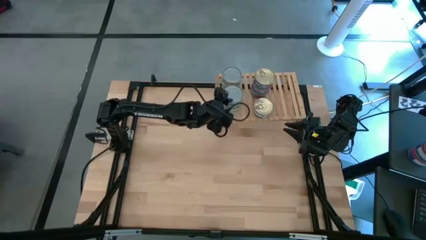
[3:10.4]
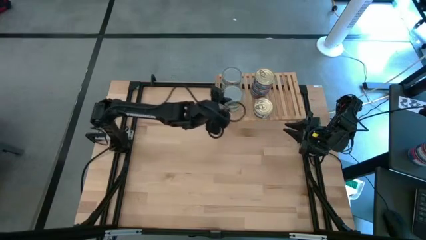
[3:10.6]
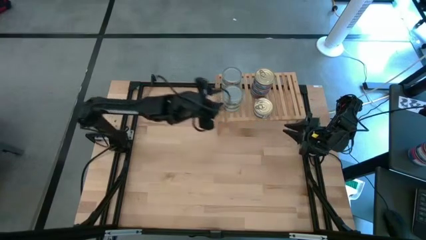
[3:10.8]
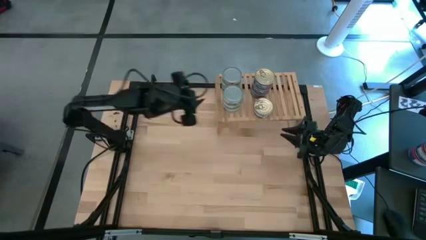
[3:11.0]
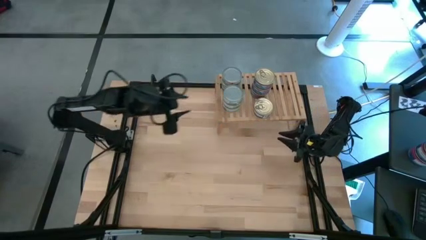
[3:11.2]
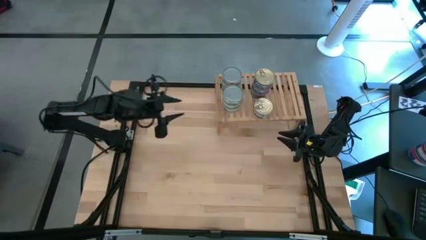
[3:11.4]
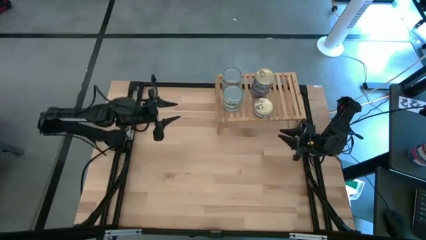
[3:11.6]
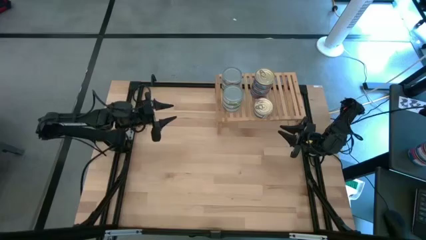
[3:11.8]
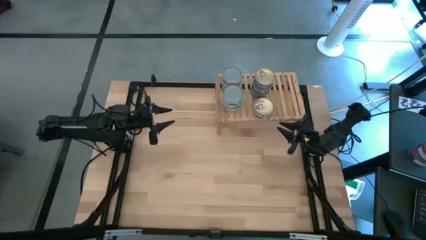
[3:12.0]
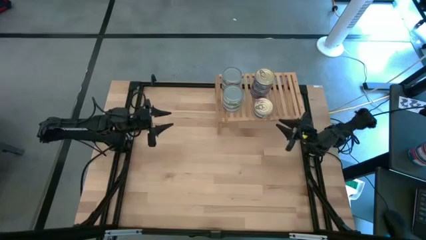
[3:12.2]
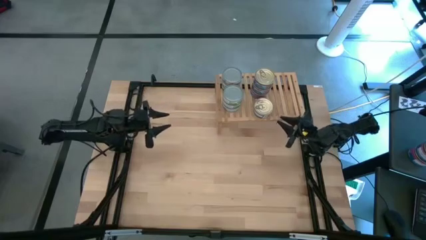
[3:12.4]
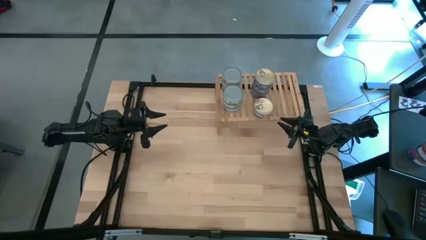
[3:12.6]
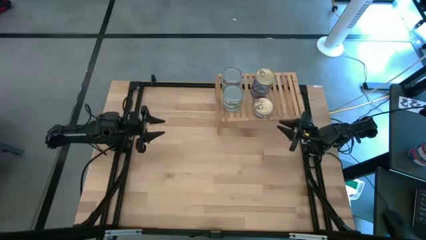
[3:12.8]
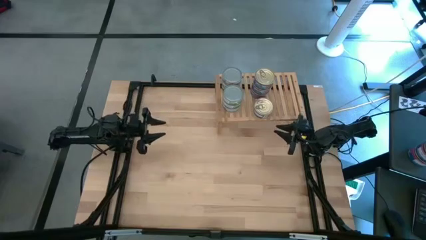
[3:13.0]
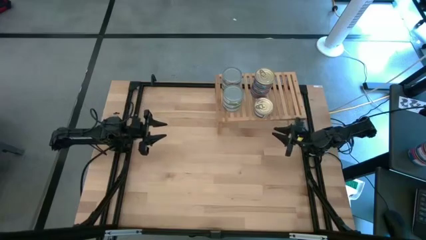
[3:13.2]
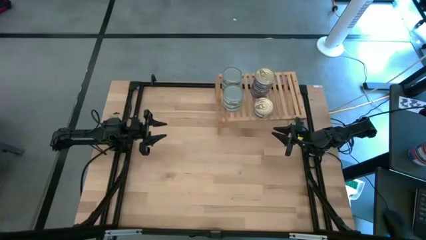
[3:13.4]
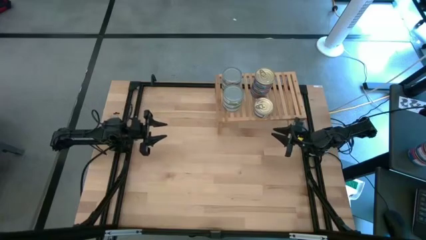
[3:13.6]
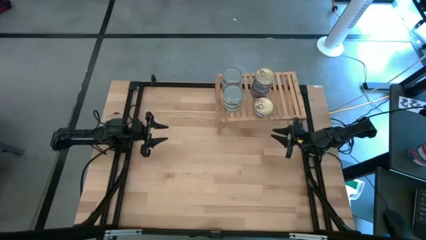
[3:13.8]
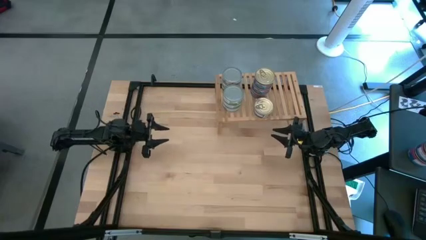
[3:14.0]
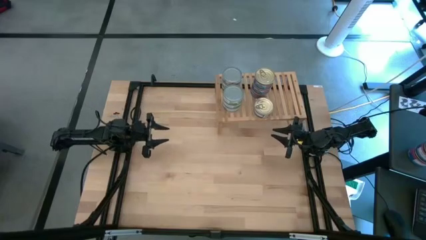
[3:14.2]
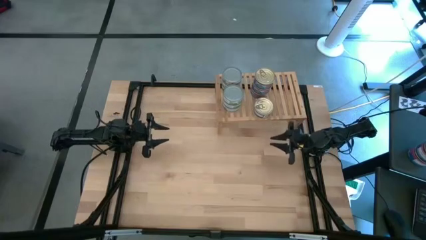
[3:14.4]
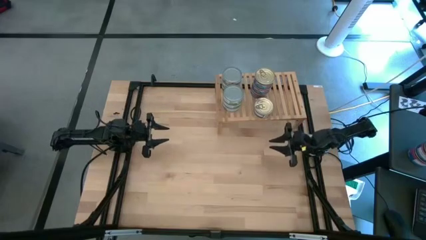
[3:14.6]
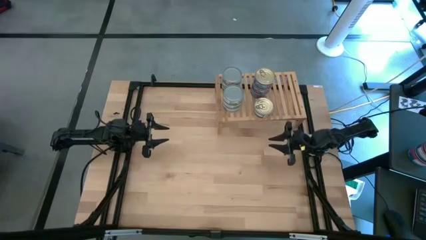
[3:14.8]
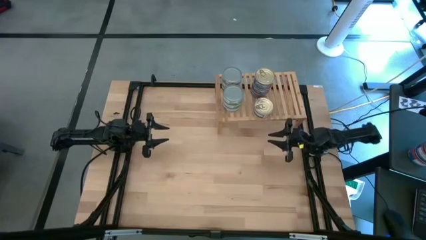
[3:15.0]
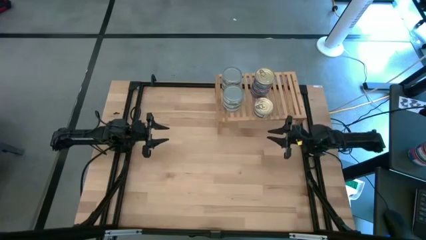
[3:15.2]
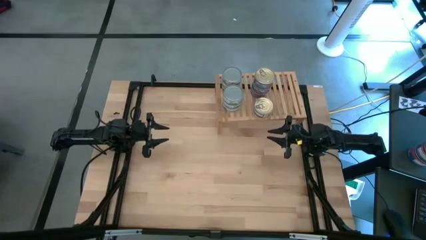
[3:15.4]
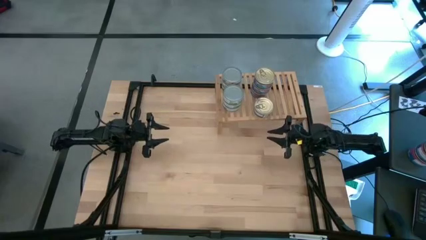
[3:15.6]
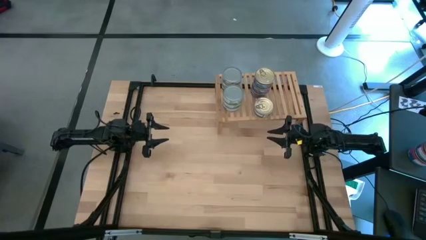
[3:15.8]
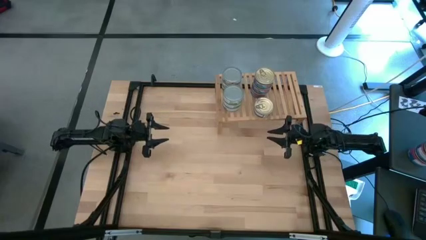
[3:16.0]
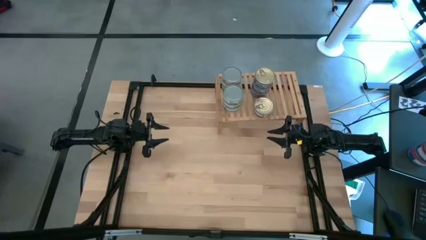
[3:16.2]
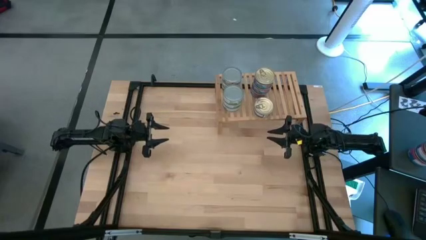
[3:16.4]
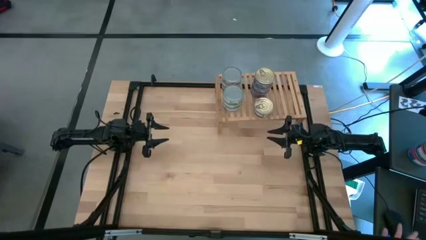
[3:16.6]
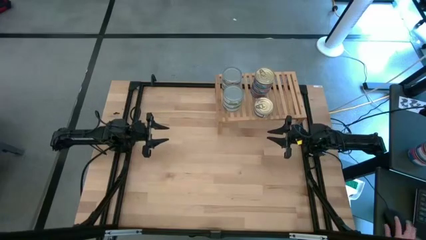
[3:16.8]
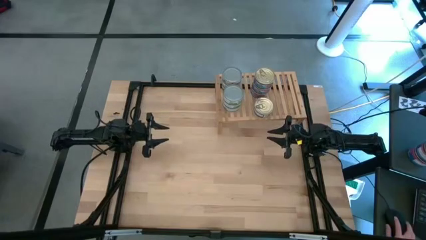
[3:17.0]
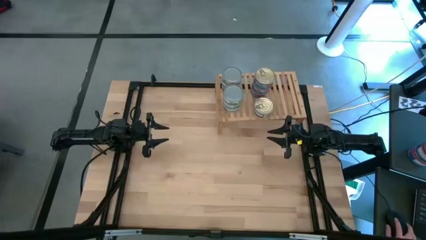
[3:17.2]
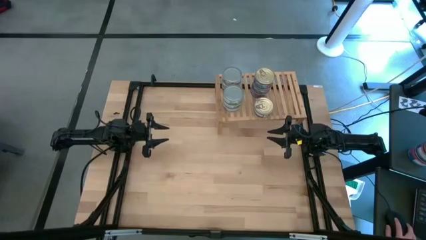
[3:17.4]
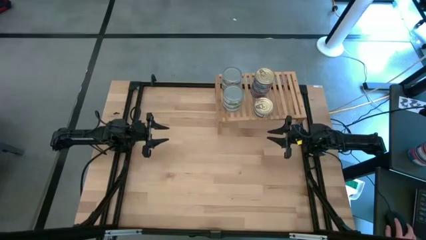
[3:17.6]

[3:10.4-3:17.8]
Task: Stack canned seafood by type on shelf
Return to Home Position

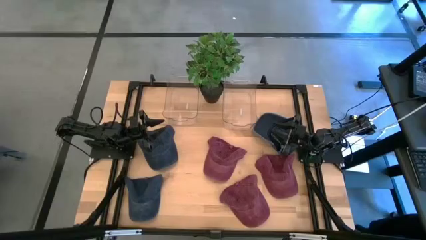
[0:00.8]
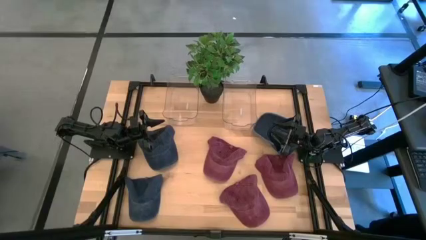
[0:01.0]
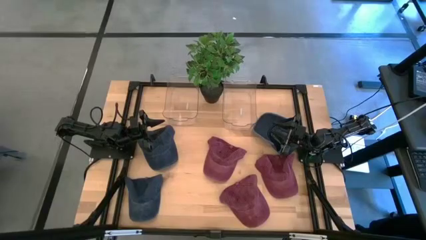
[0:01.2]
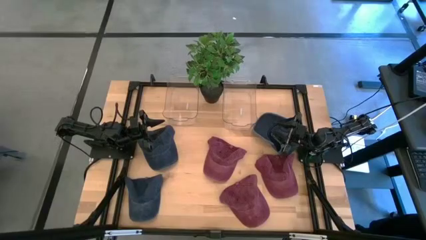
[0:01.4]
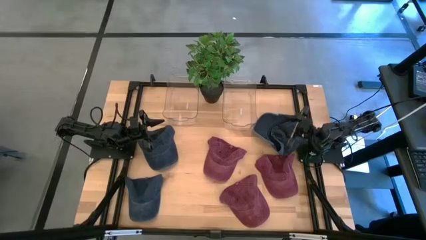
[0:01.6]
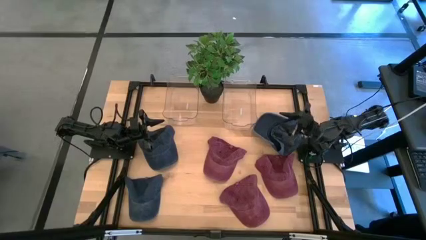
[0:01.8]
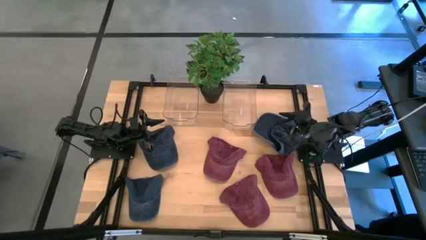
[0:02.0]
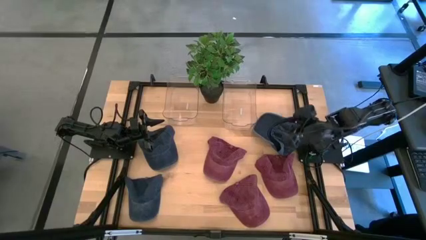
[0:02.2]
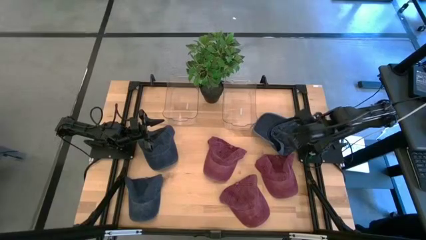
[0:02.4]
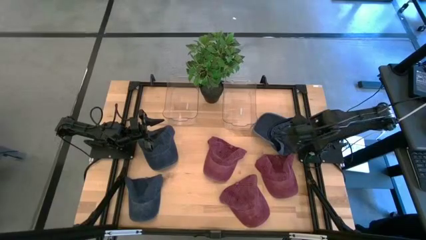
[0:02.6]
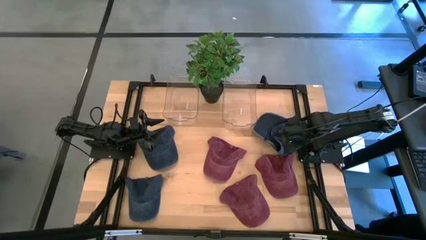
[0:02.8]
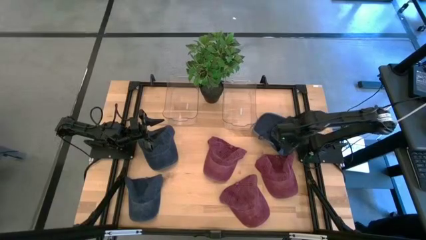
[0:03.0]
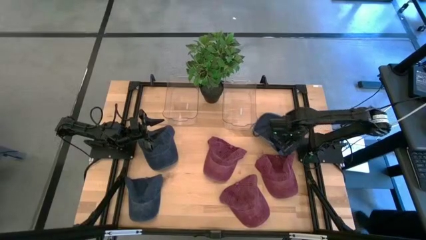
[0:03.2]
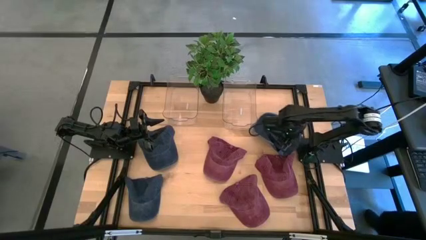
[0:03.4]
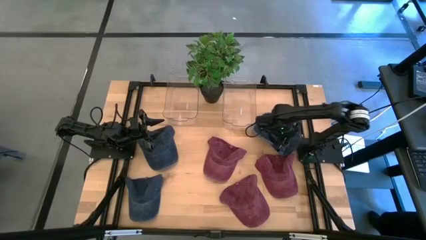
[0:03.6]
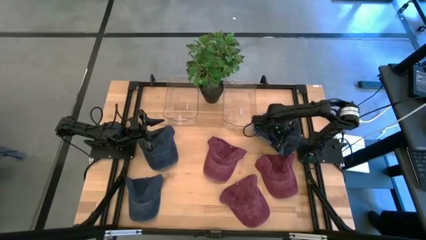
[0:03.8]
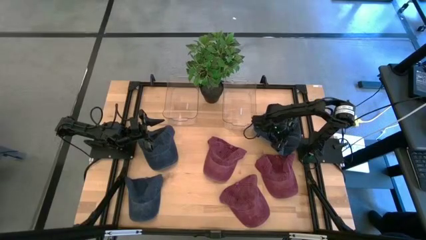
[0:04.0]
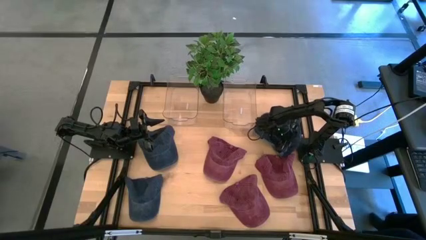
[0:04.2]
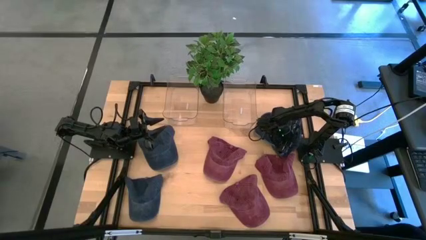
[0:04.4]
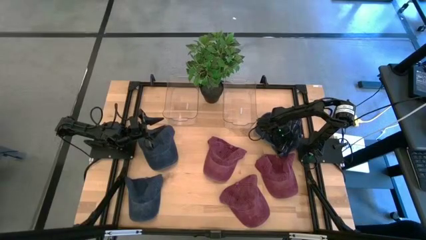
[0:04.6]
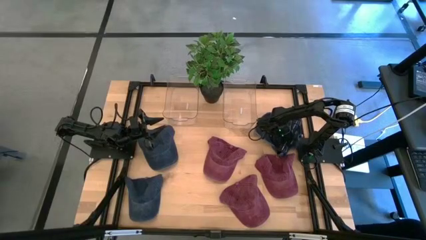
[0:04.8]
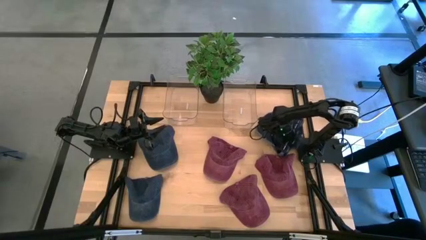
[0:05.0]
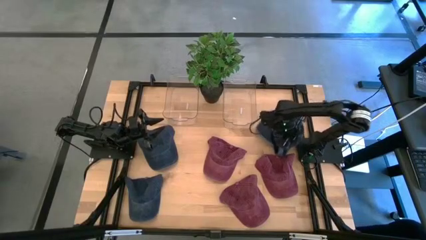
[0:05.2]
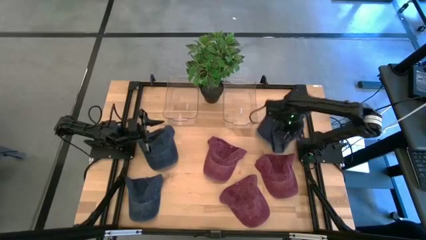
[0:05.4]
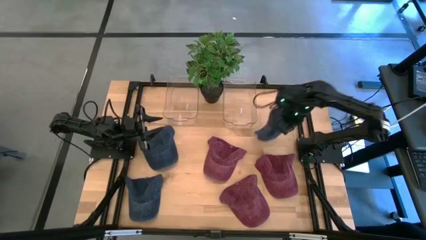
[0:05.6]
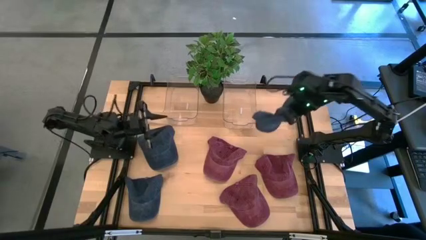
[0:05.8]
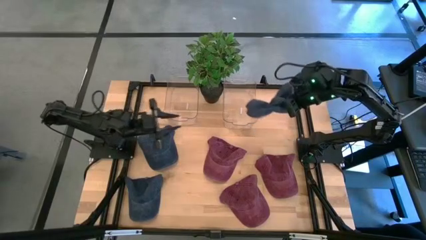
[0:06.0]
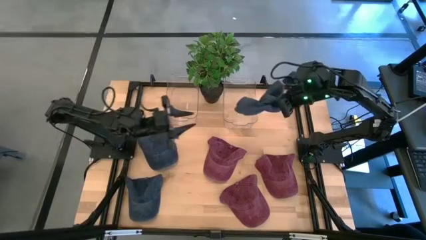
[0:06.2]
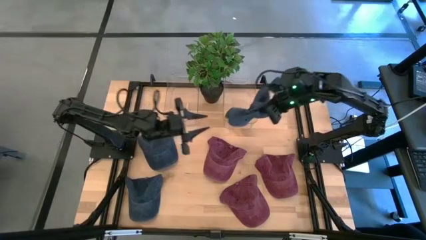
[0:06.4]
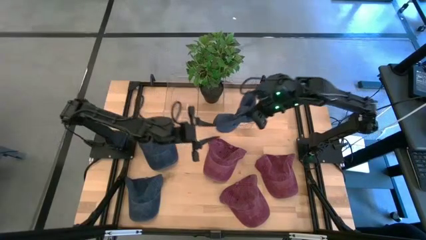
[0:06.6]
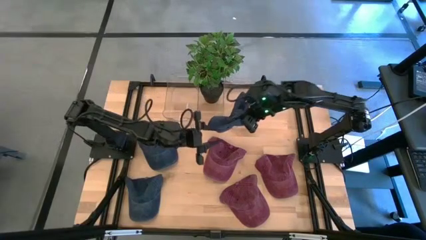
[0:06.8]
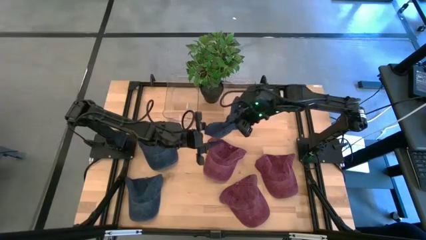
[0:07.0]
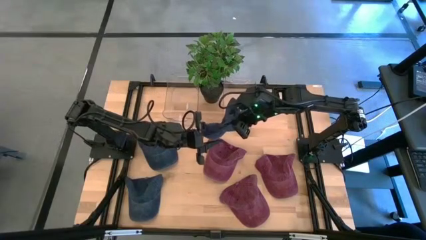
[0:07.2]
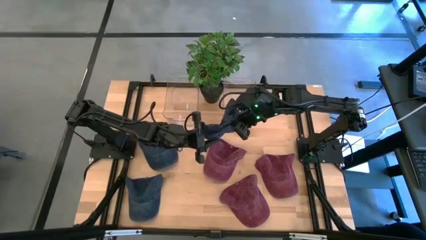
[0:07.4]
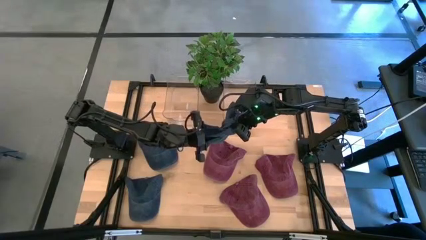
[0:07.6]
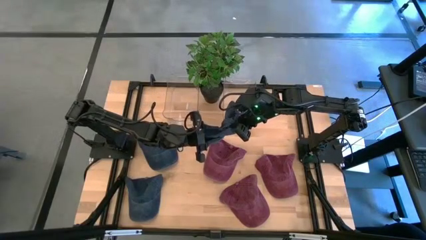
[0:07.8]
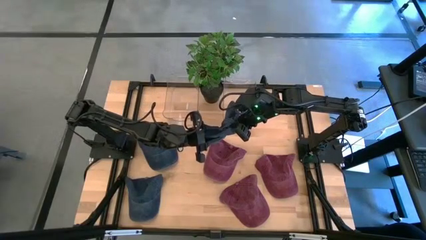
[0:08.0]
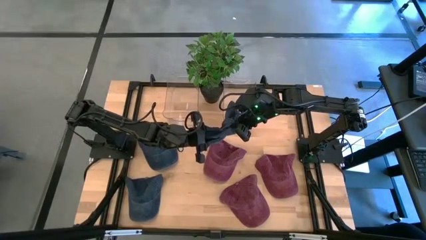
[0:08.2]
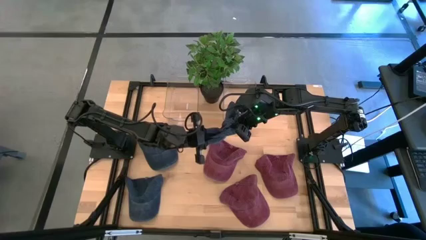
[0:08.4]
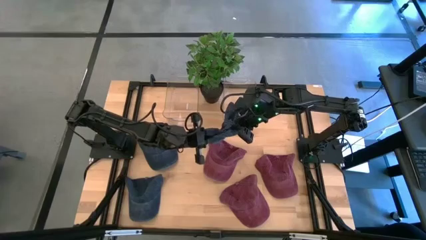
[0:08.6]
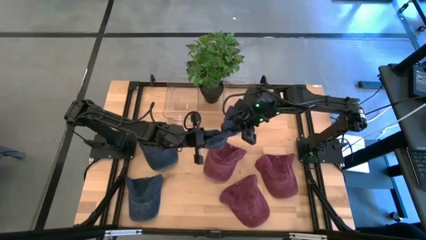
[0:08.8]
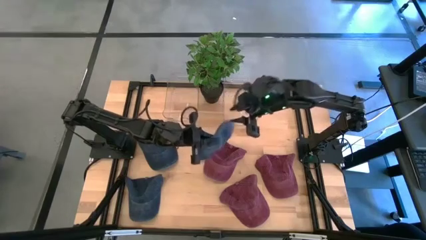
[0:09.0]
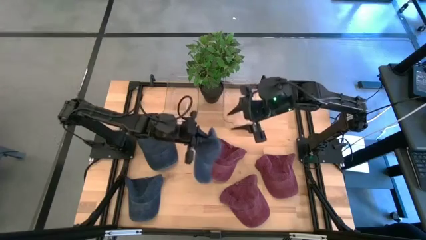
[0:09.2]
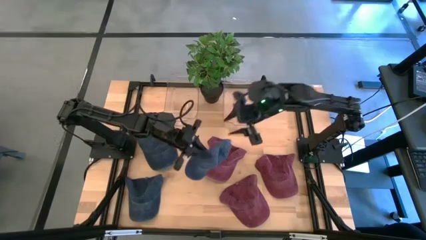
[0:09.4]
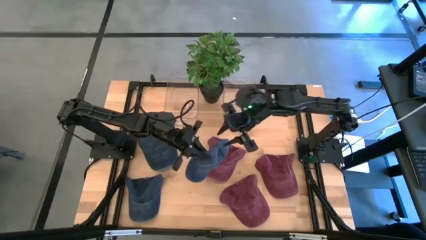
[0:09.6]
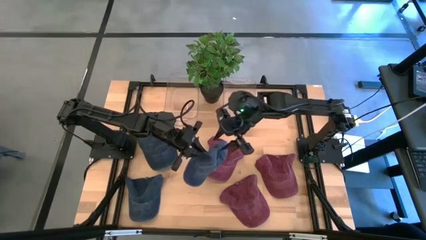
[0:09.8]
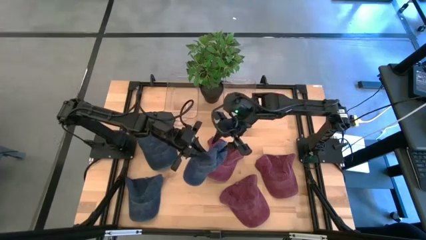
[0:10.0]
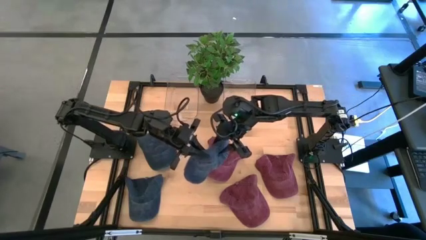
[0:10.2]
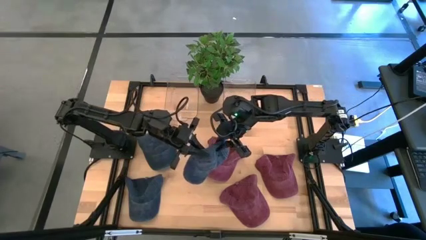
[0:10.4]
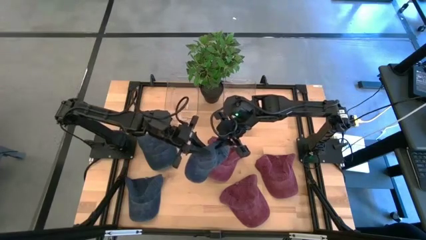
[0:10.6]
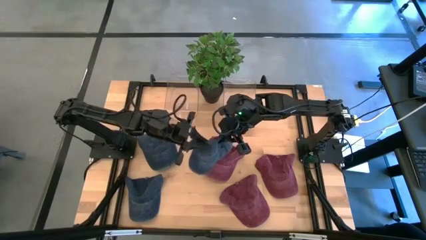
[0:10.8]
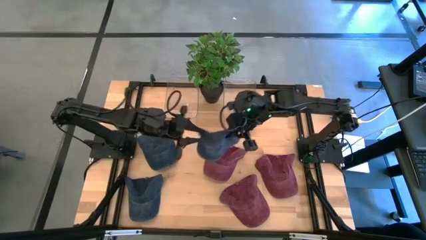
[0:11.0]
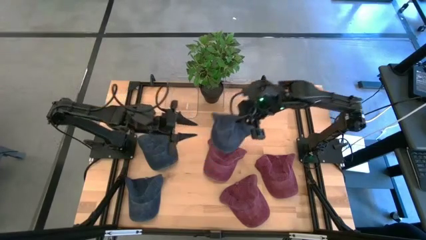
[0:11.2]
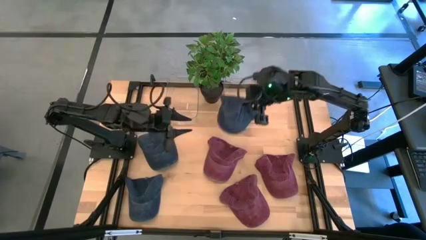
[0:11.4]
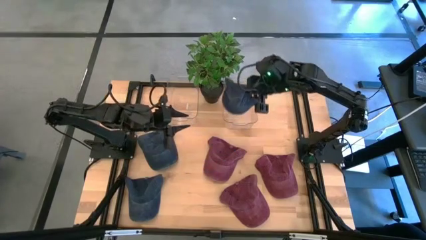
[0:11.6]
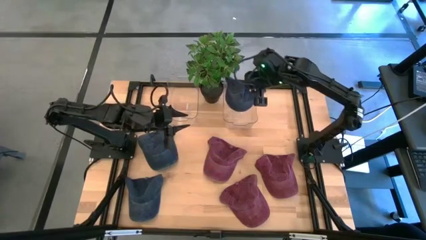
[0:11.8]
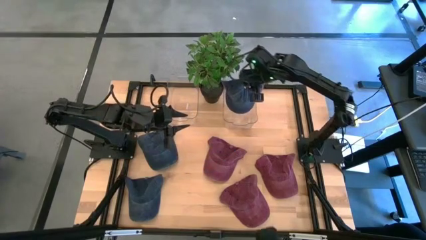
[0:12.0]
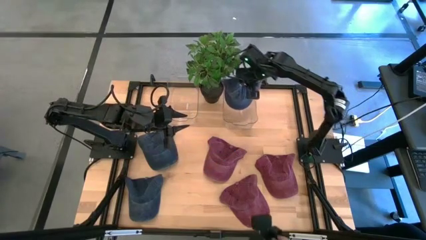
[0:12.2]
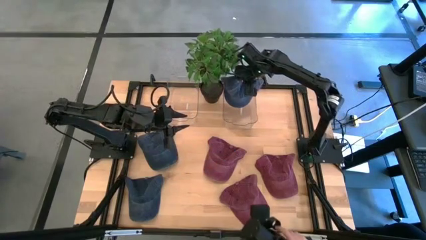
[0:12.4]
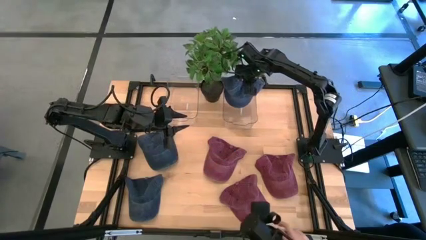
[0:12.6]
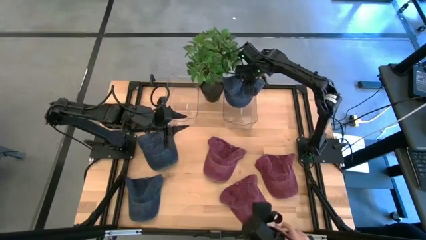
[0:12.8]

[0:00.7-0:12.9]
Task: Pick & Place hat
Put the top right blue cap into the right transparent bin
